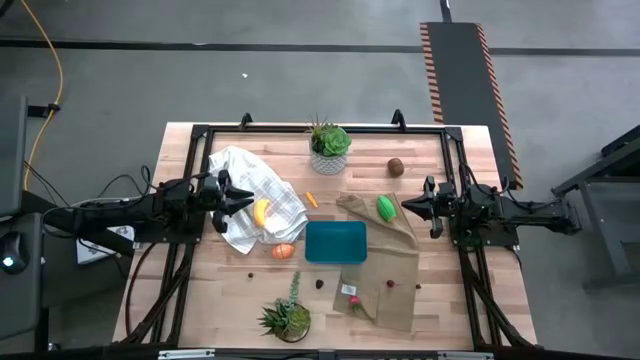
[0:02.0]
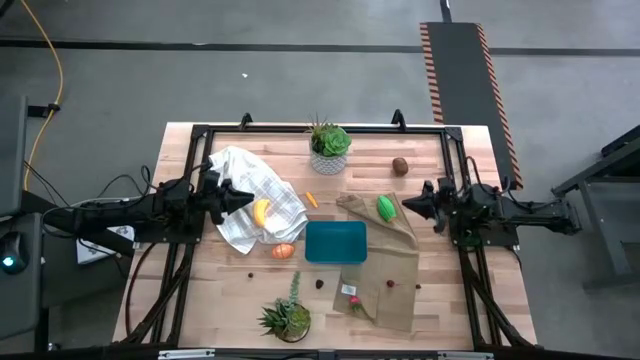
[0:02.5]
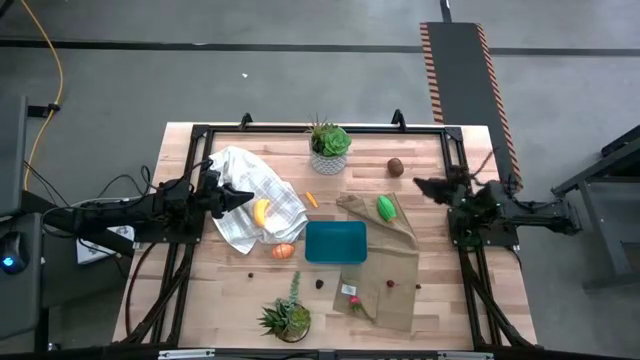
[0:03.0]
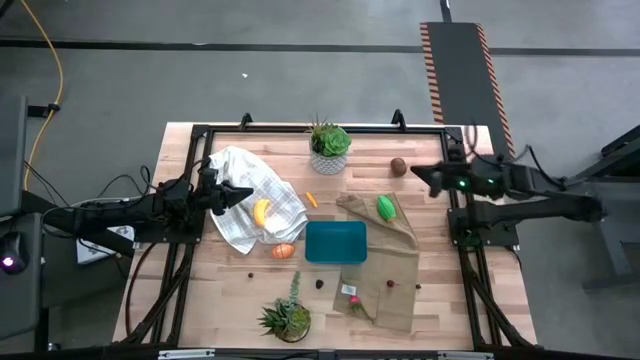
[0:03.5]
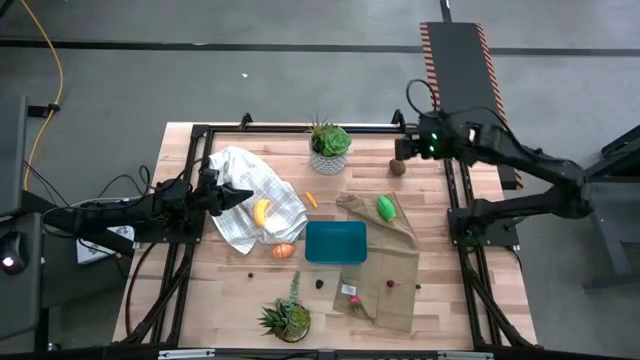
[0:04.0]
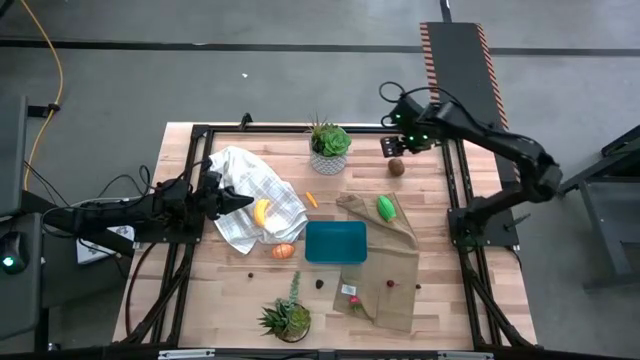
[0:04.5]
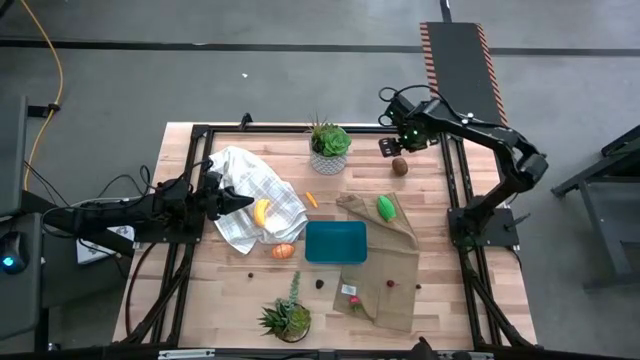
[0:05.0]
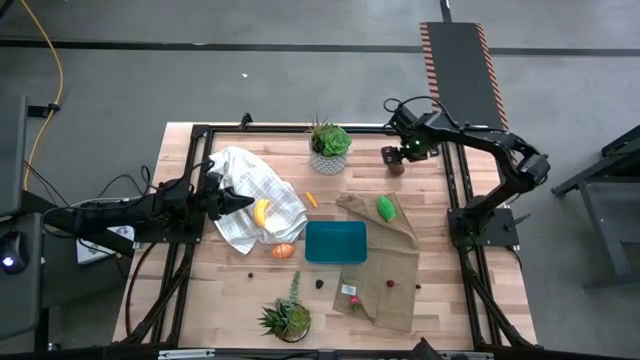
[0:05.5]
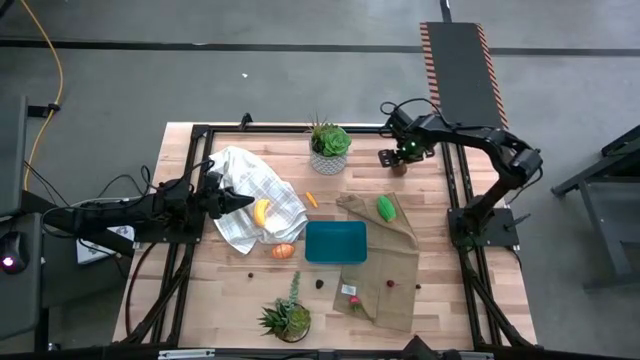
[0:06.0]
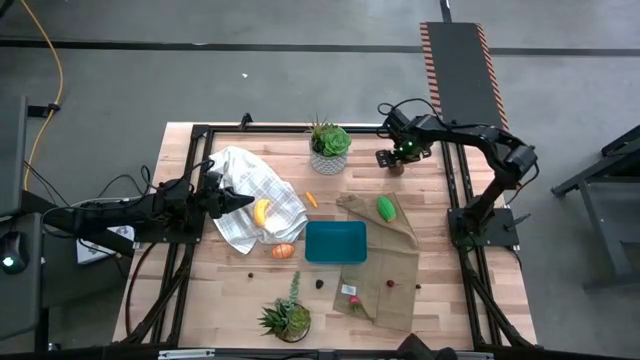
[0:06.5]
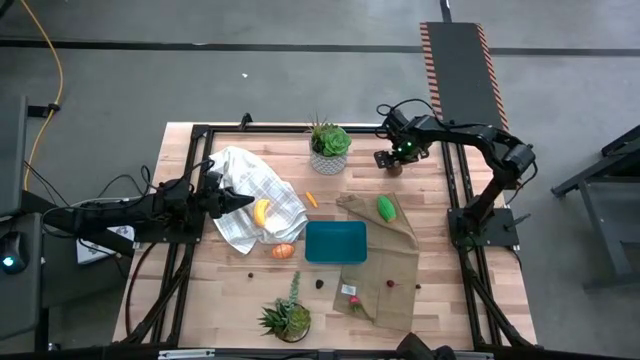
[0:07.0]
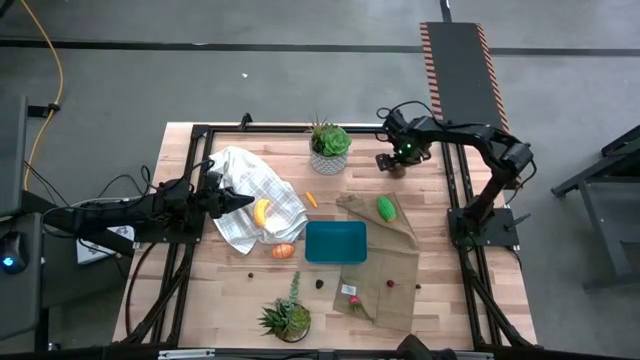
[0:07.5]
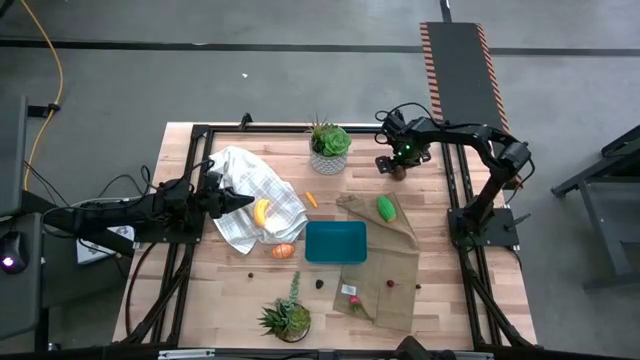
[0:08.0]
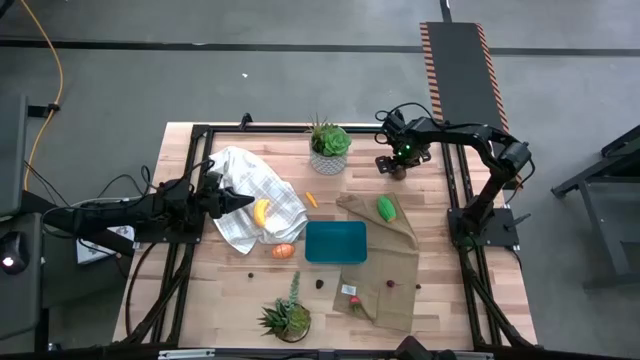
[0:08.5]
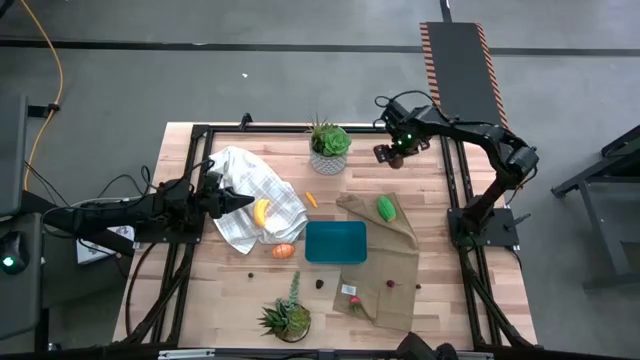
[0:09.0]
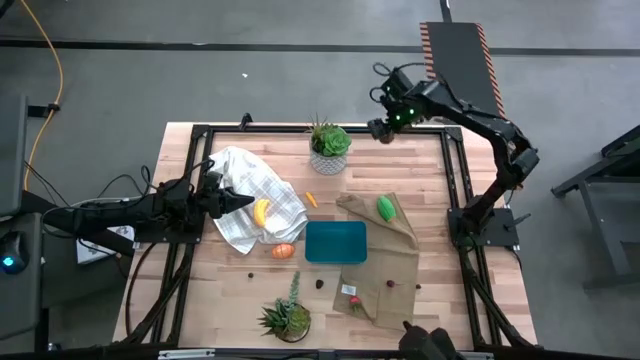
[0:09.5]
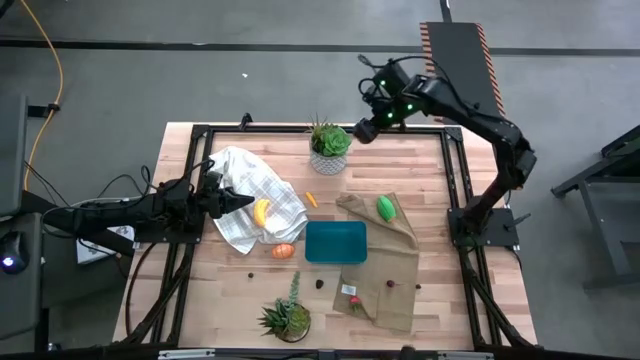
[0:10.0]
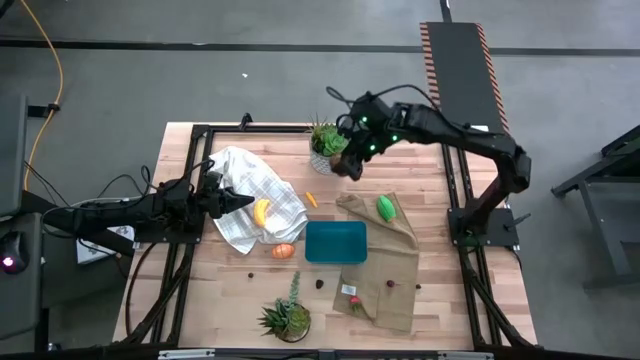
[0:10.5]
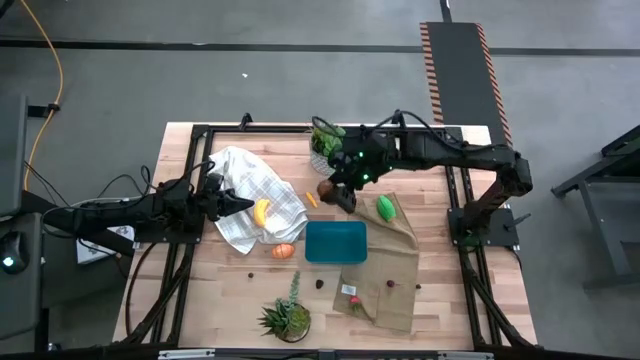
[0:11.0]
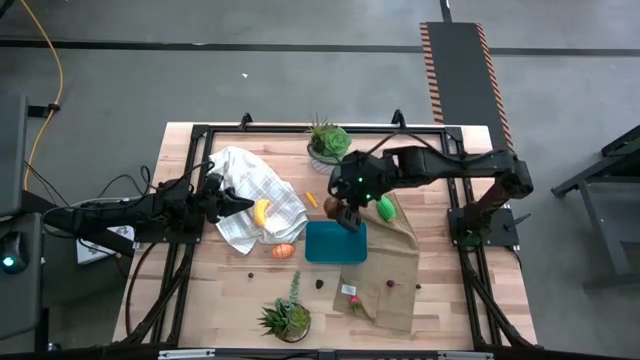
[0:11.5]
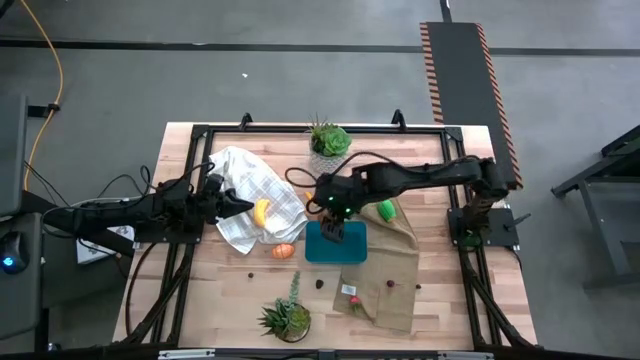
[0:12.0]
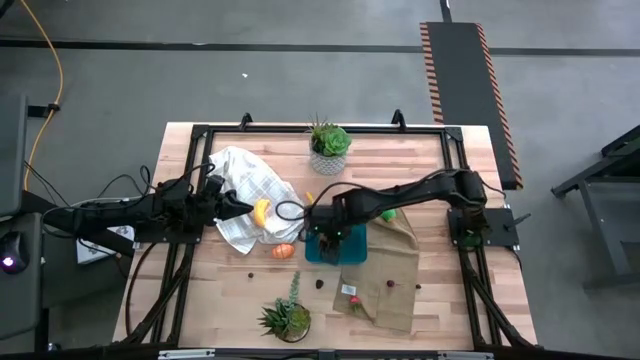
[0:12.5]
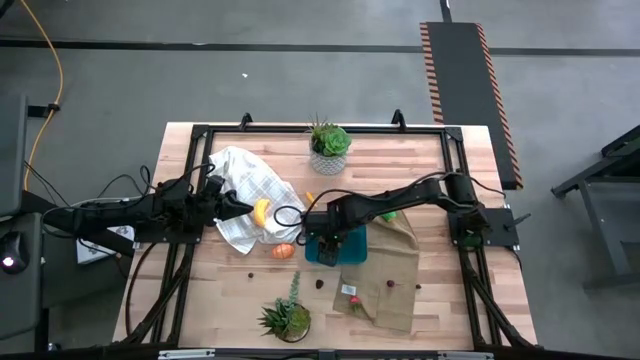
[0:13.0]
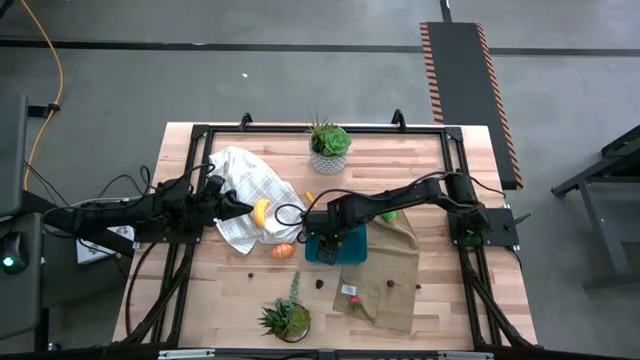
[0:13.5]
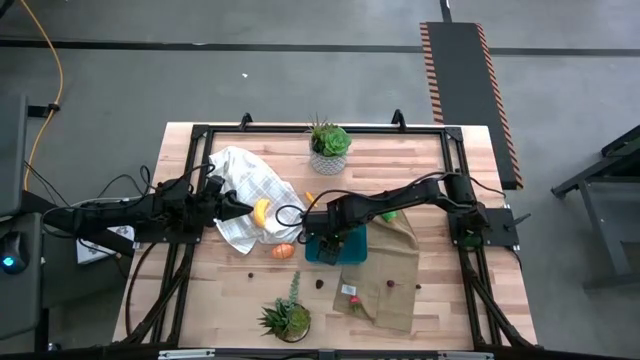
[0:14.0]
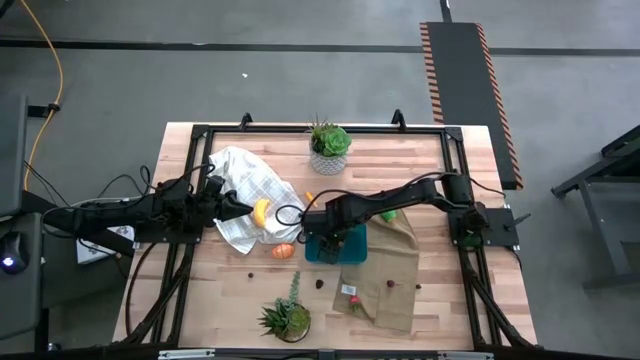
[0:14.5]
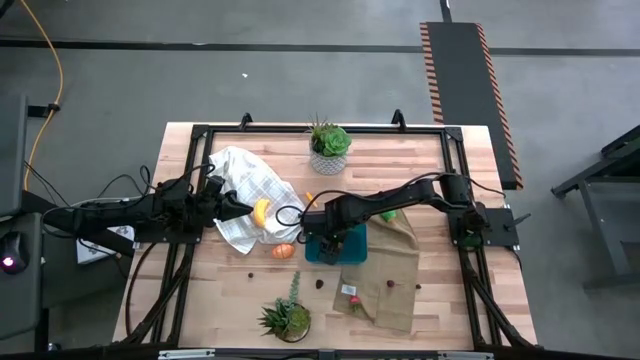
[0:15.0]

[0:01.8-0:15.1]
Task: Pick and placing Produce into tupperware
Put the brown kiwi into the blue bin

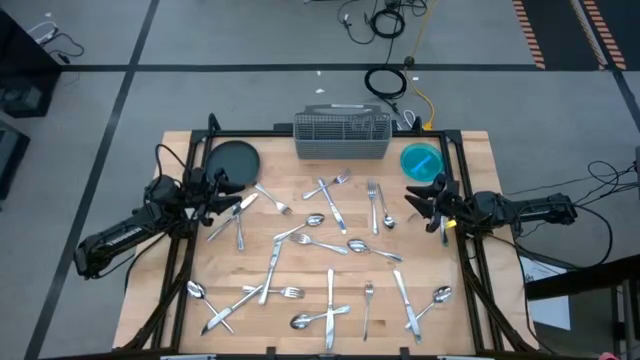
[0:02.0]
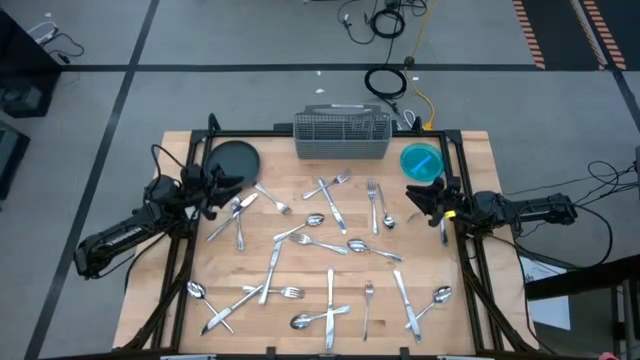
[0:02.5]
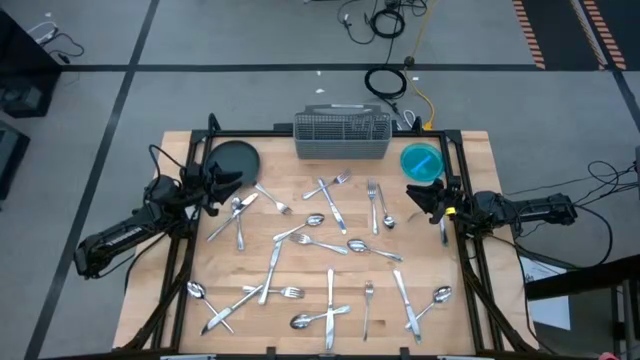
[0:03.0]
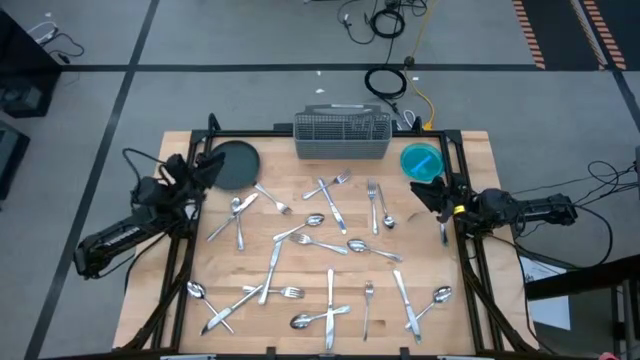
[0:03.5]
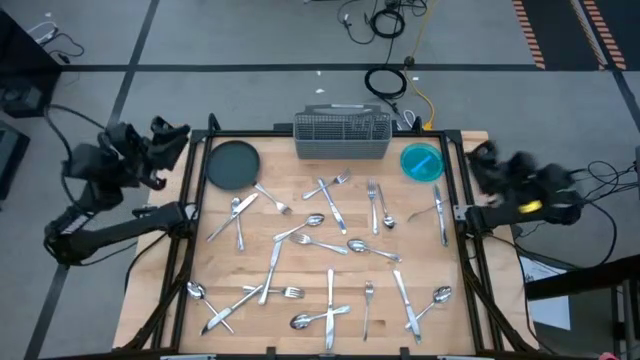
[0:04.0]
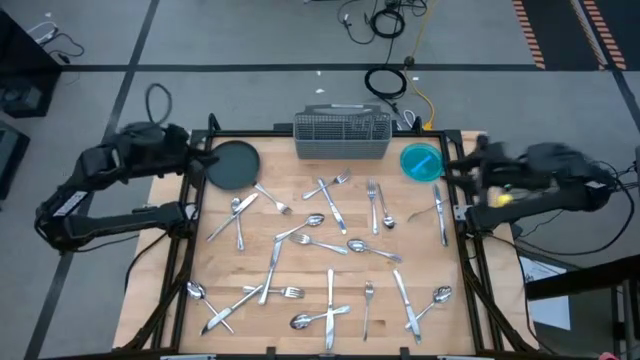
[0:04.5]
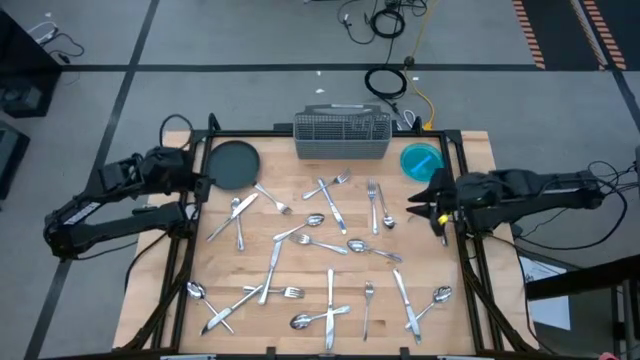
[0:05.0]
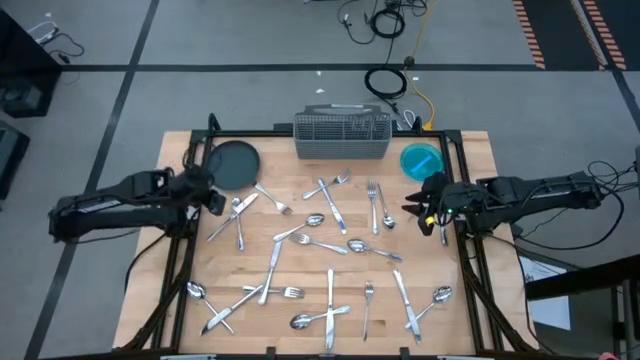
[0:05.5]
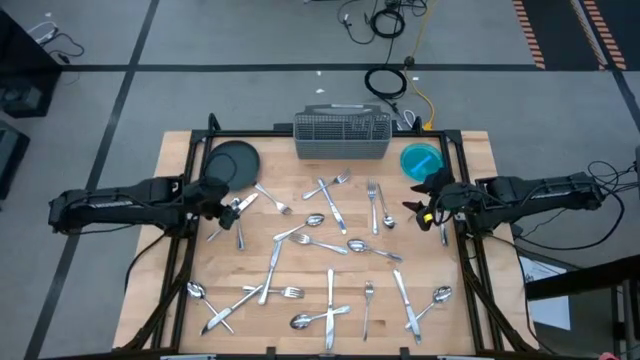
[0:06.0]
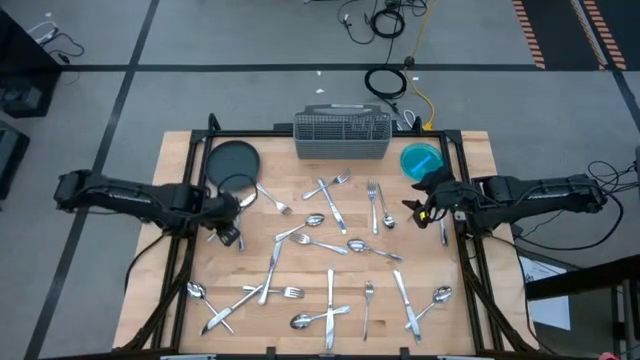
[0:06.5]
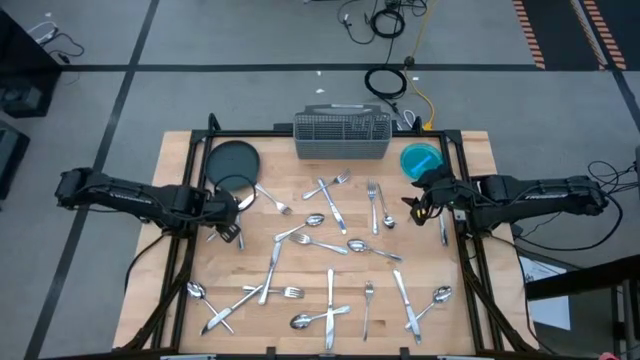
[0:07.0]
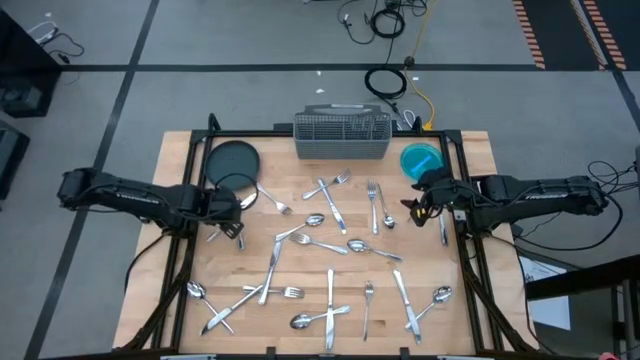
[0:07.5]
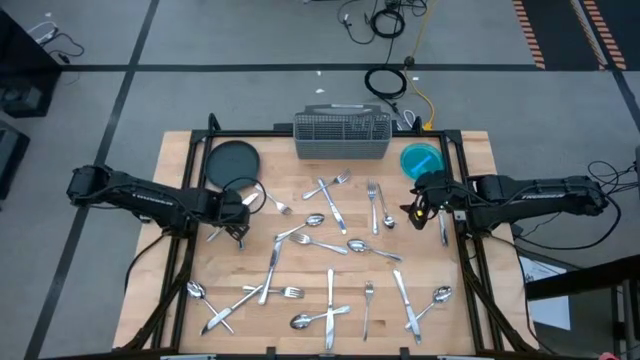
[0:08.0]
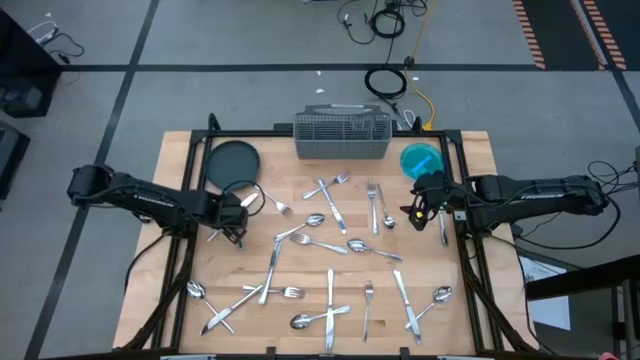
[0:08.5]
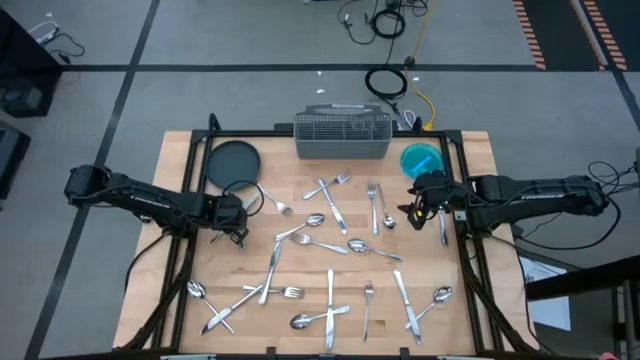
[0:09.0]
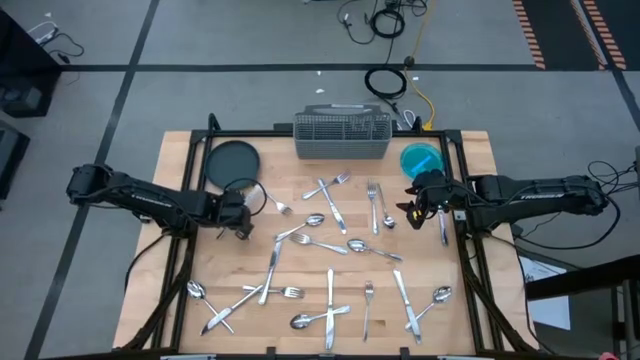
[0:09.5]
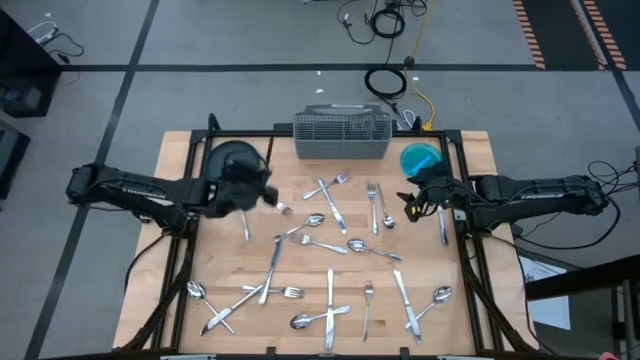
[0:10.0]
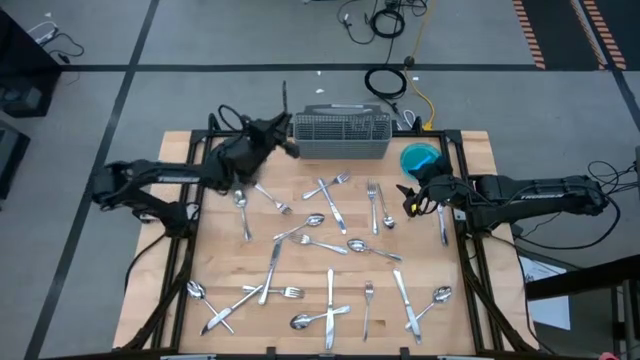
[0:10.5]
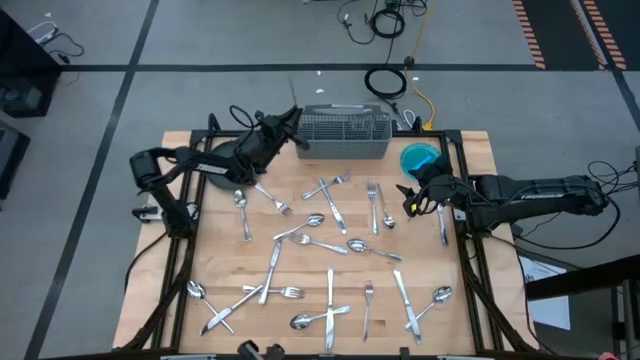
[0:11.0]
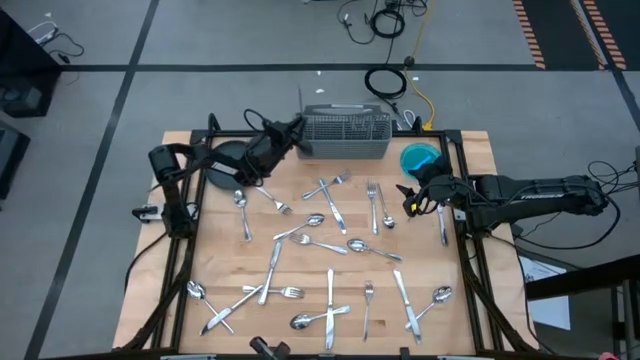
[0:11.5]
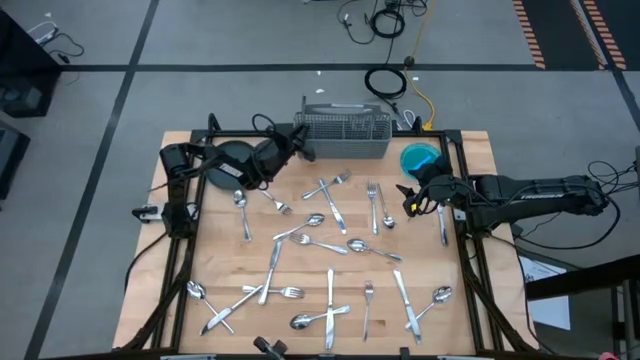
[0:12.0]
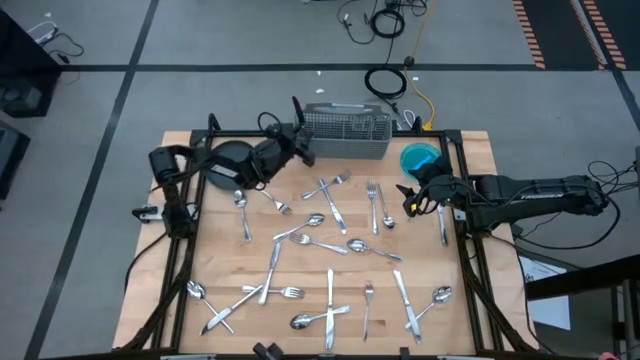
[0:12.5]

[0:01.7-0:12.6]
Task: Sort silverware
Put the table knife into the silverware organizer
